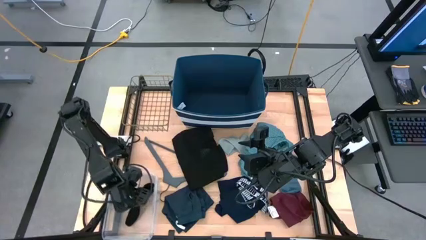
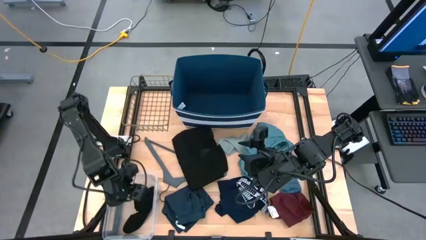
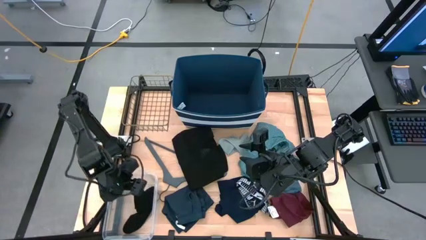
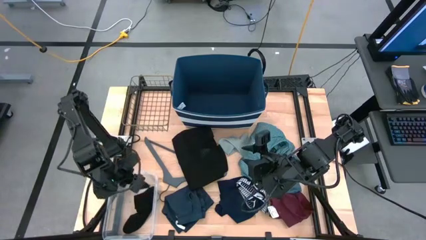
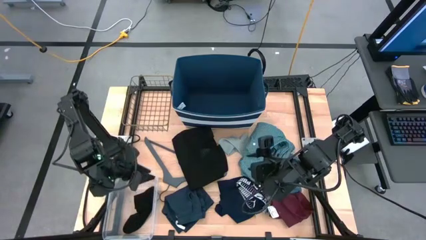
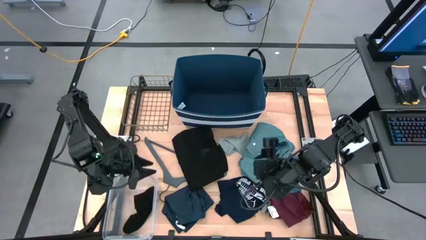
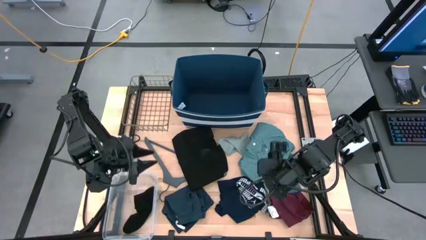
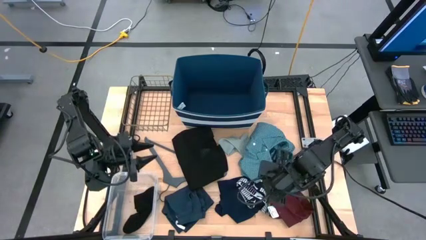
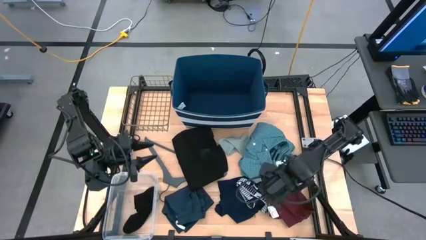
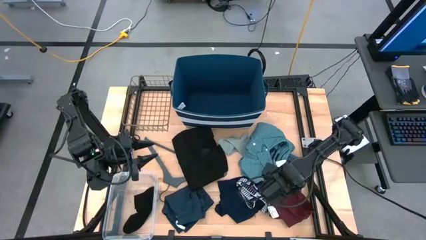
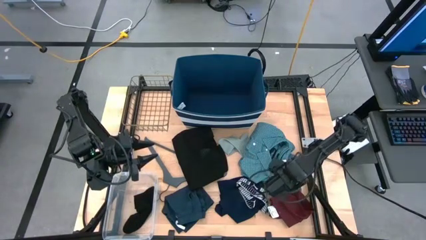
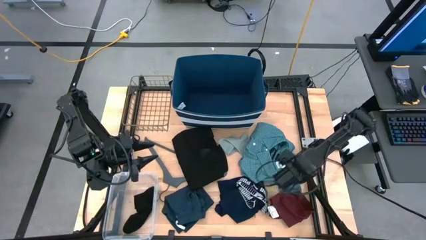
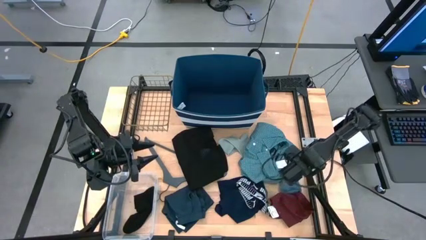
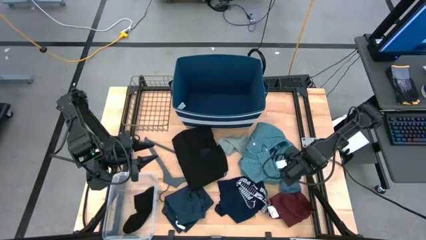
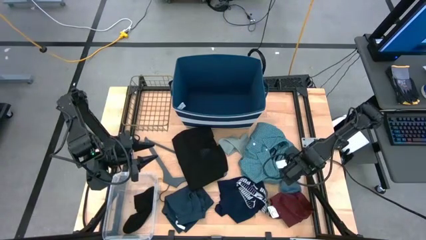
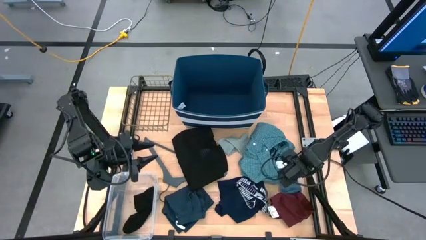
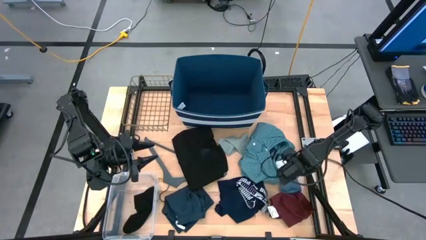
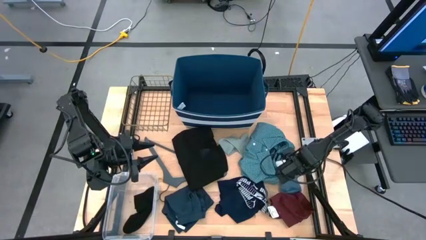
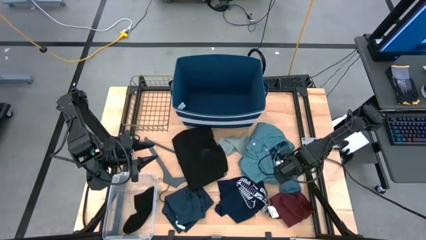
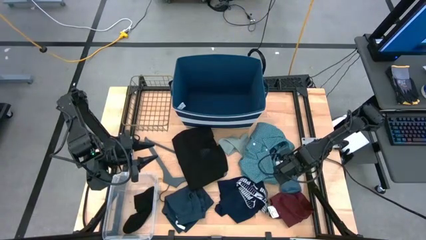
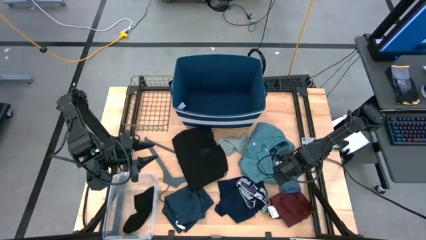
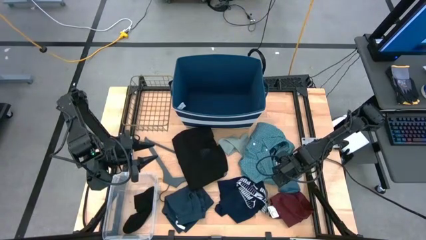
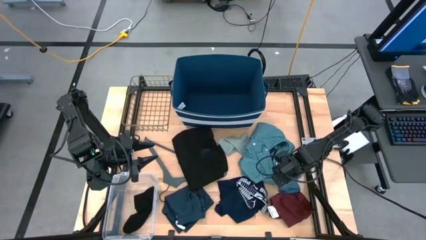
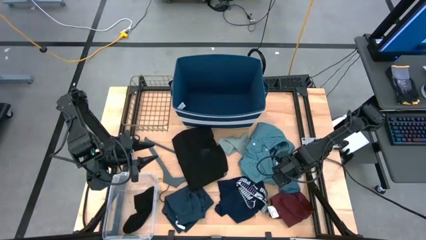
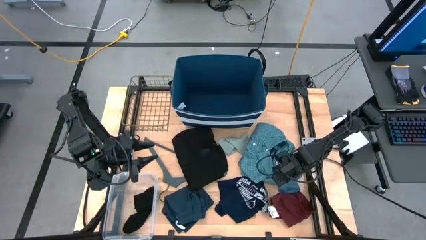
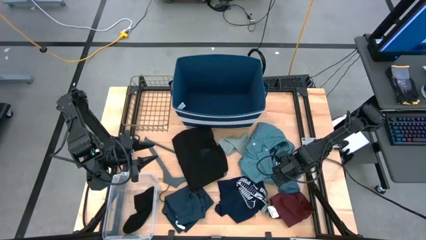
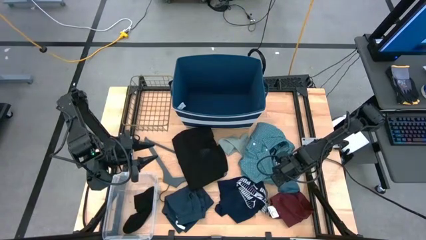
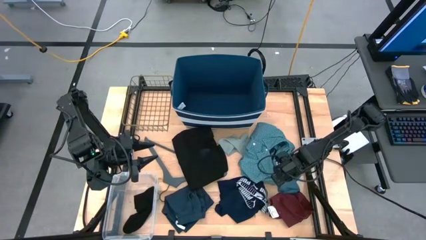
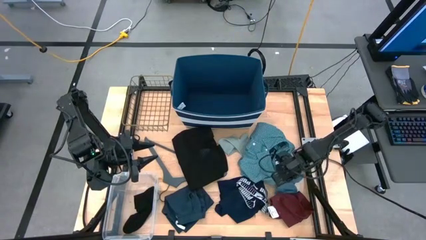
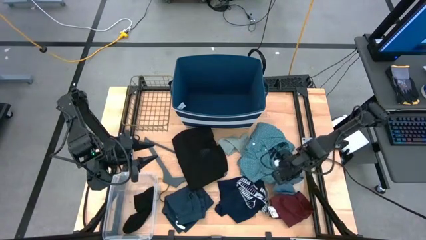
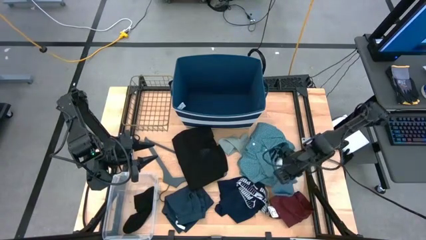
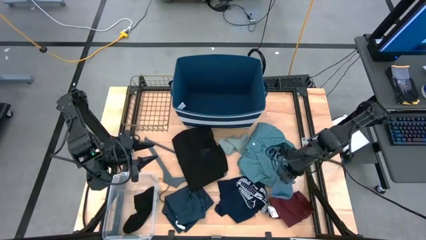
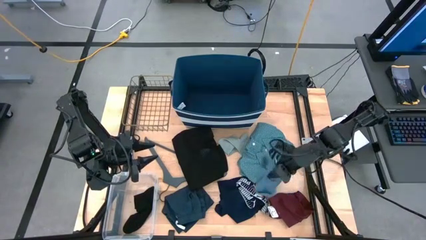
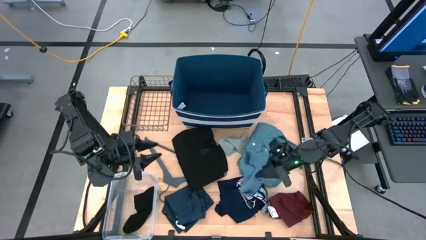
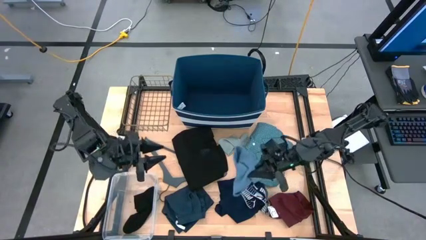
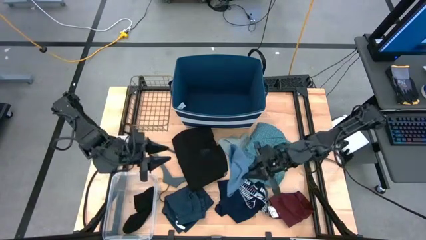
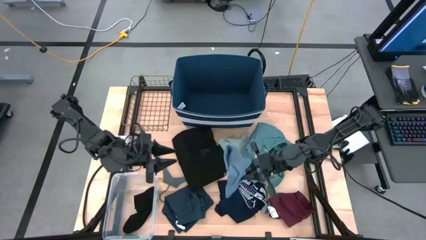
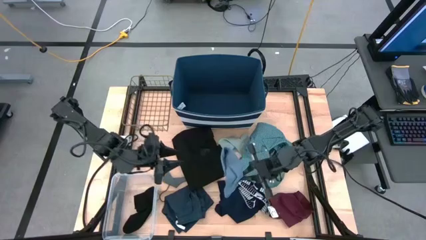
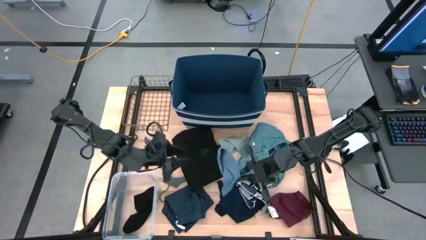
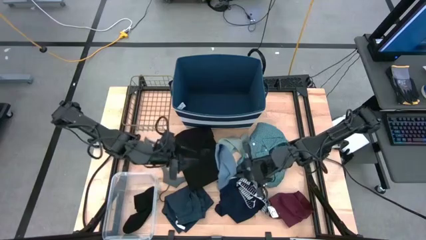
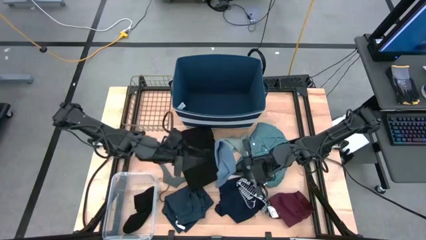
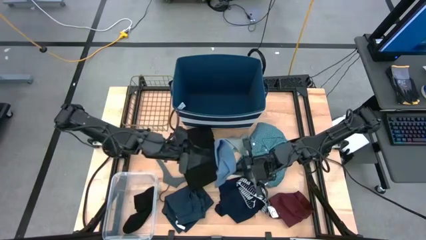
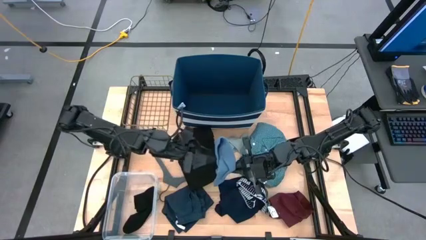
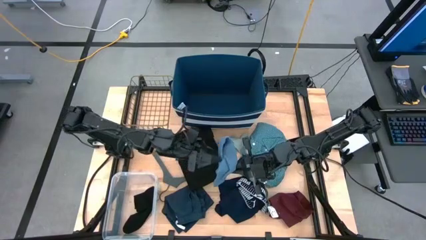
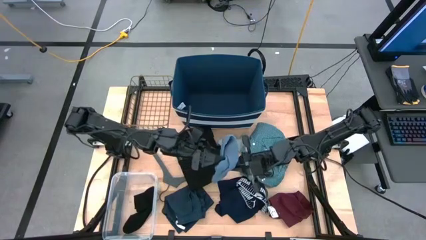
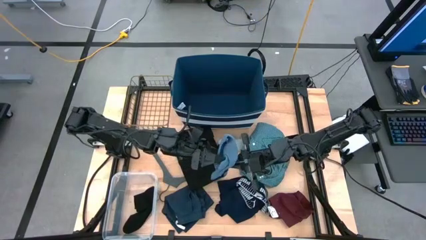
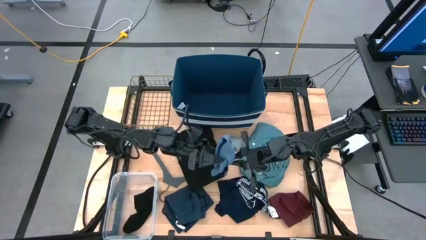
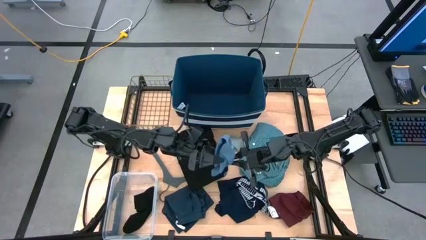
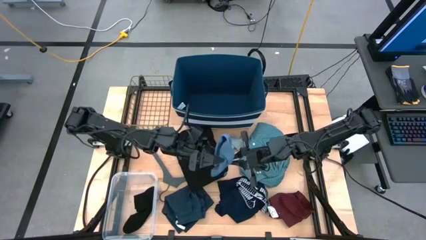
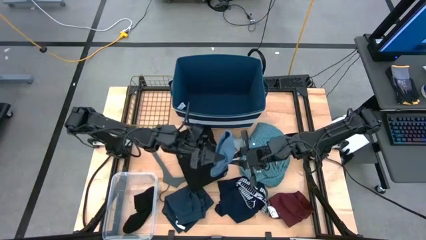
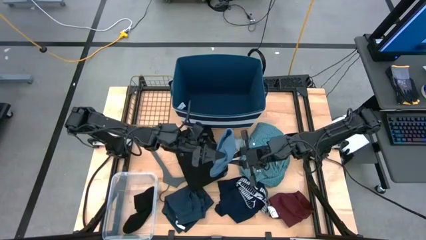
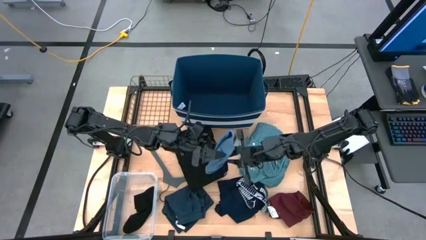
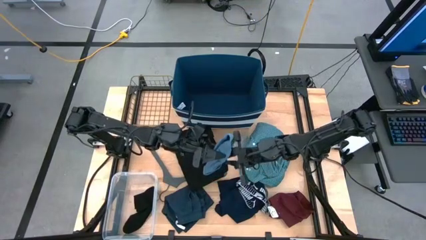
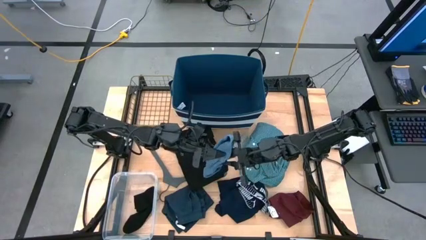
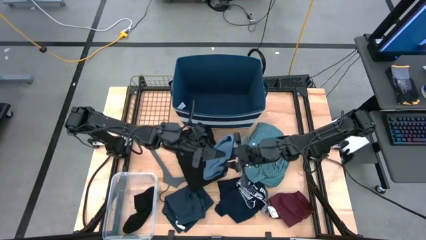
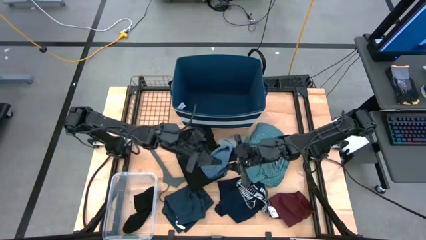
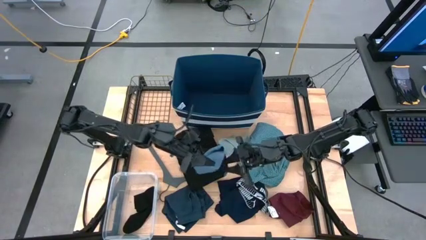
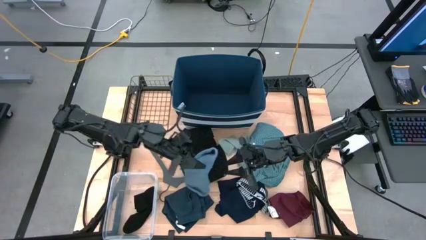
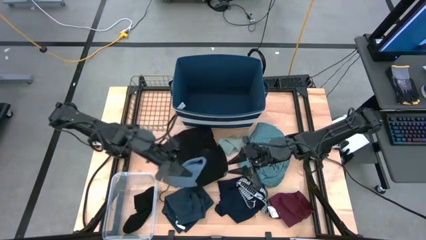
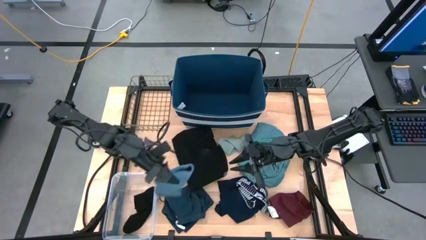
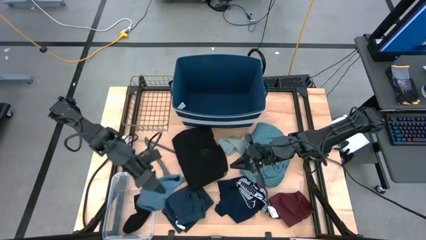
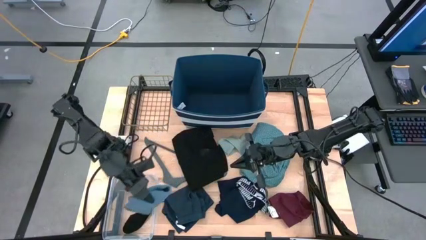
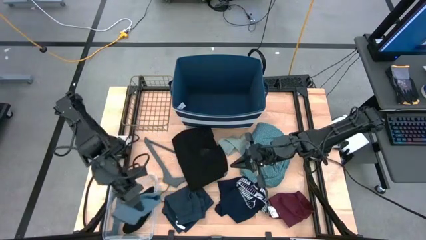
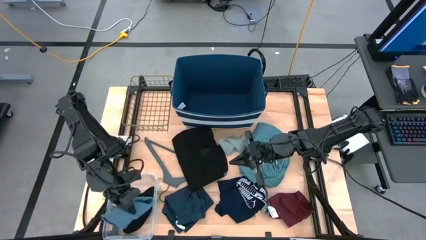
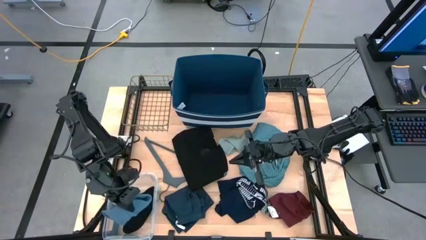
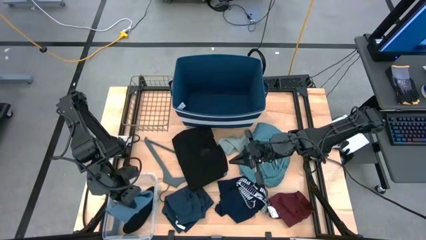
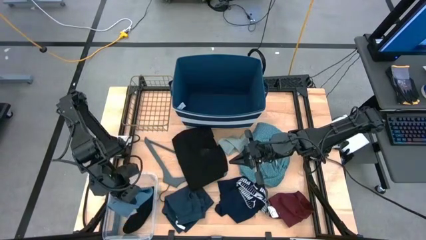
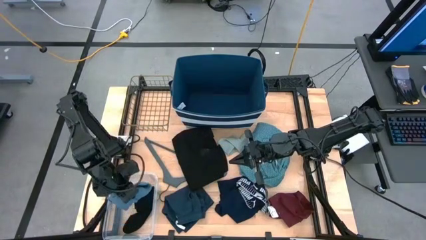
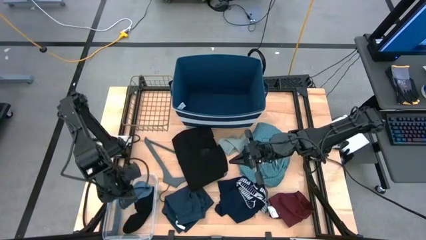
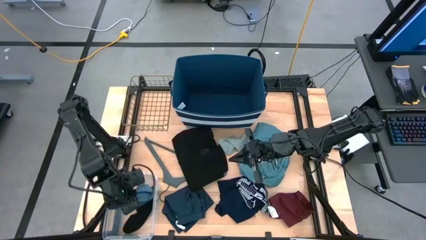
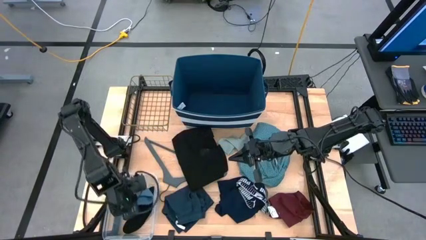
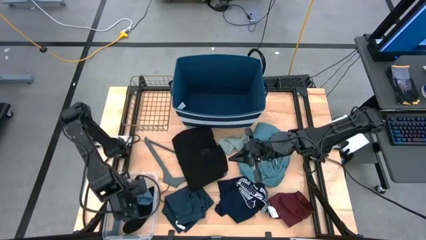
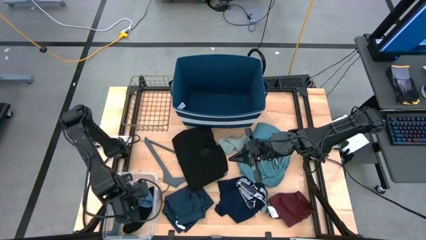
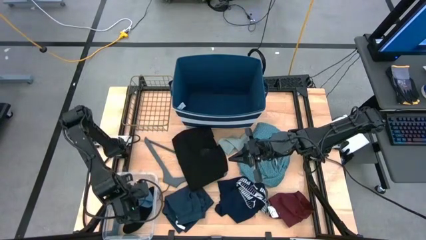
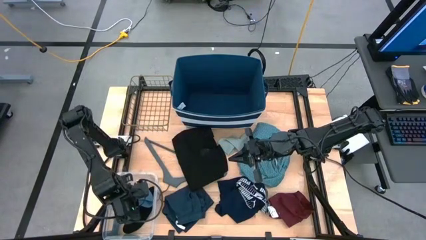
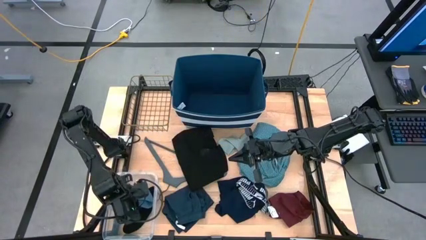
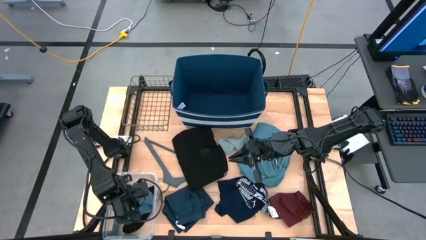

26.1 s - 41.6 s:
Task: Pick & Place Cloths
Put the blue sock into the transparent container
